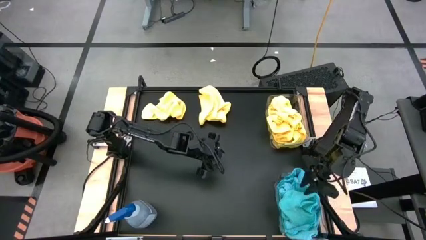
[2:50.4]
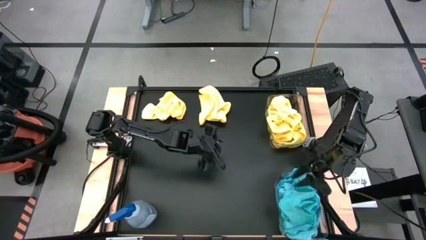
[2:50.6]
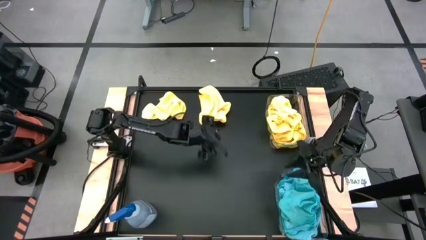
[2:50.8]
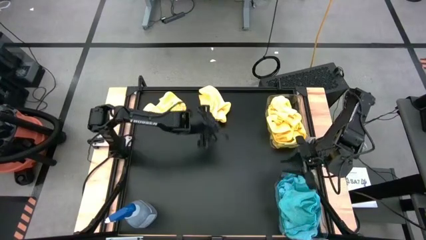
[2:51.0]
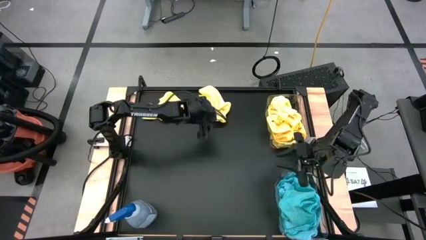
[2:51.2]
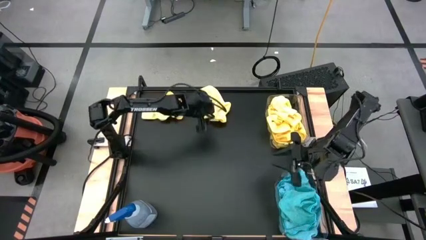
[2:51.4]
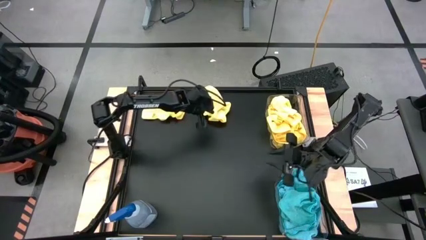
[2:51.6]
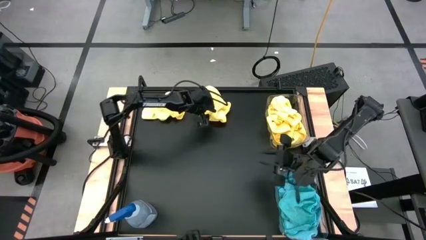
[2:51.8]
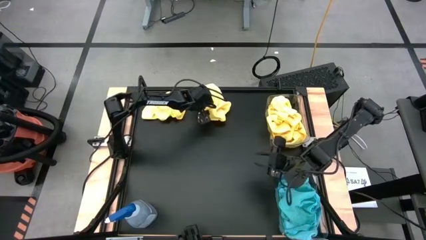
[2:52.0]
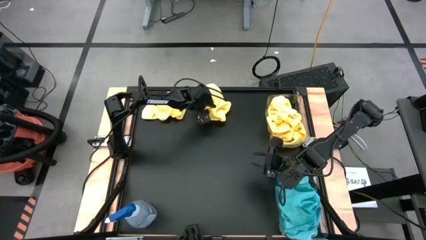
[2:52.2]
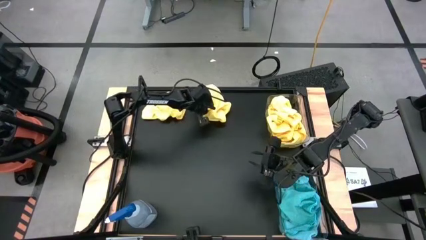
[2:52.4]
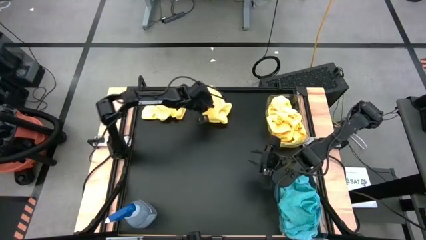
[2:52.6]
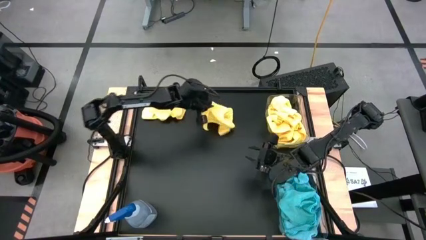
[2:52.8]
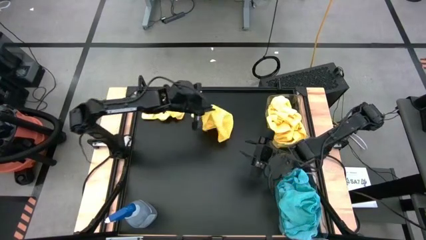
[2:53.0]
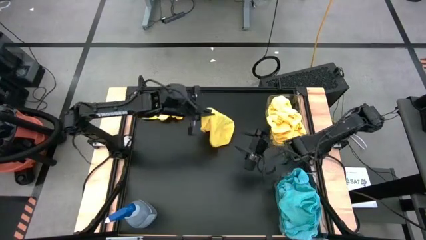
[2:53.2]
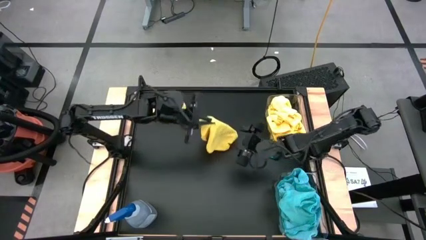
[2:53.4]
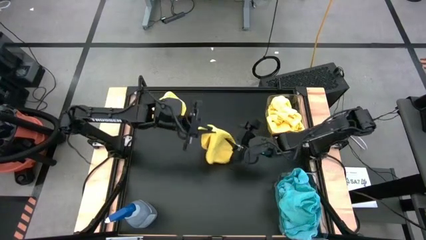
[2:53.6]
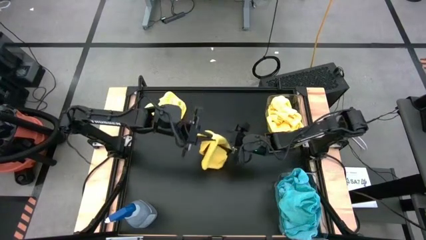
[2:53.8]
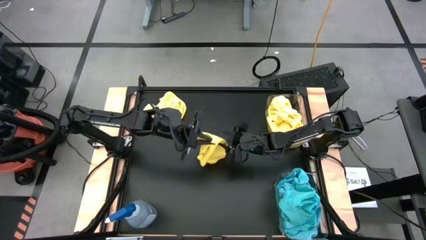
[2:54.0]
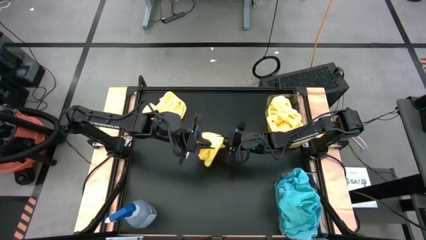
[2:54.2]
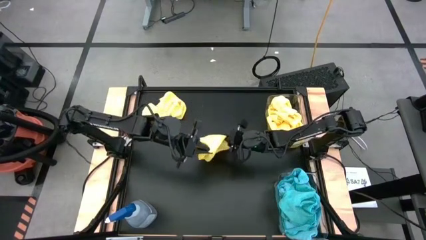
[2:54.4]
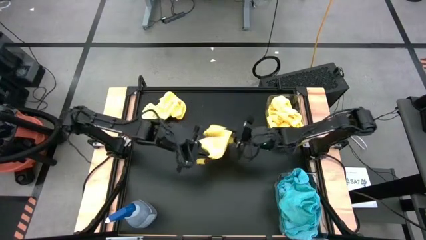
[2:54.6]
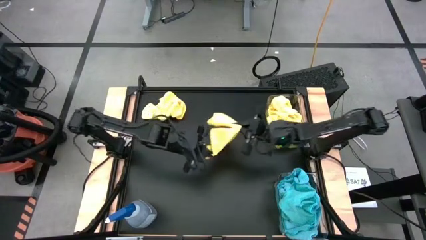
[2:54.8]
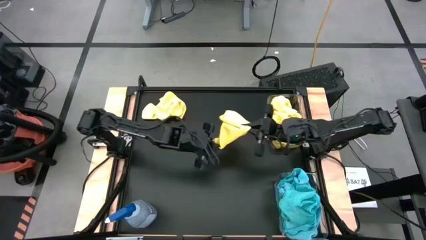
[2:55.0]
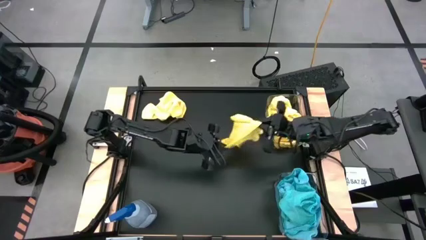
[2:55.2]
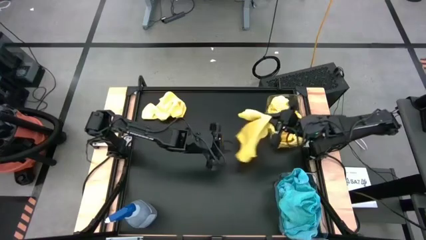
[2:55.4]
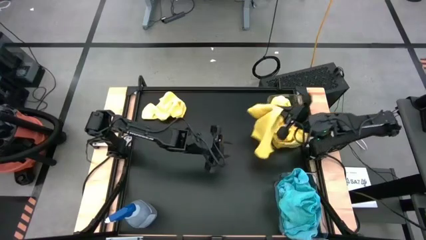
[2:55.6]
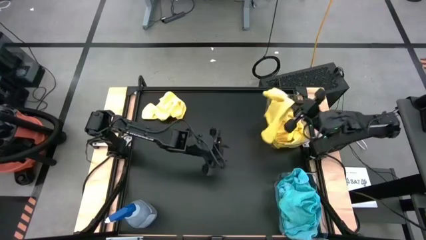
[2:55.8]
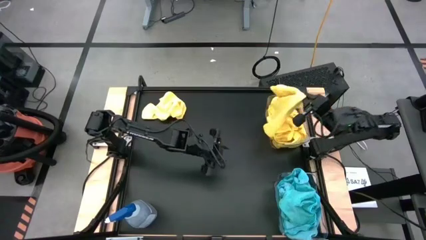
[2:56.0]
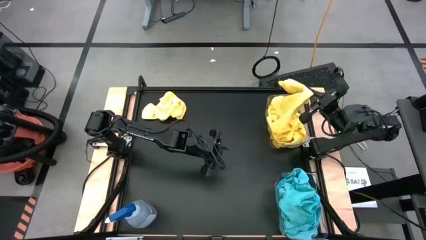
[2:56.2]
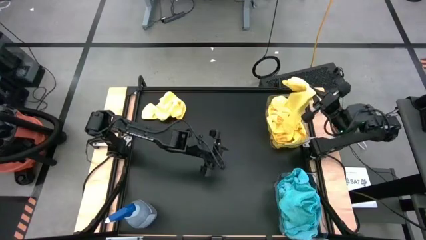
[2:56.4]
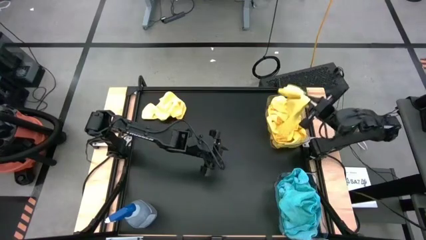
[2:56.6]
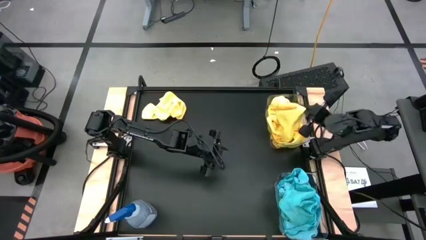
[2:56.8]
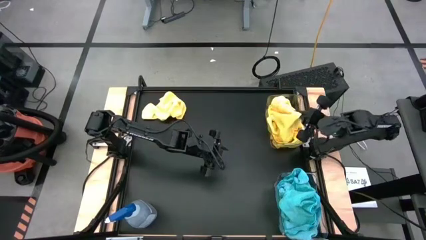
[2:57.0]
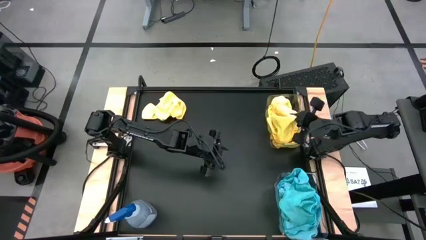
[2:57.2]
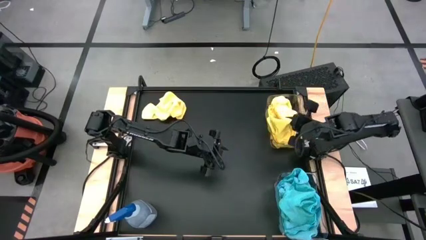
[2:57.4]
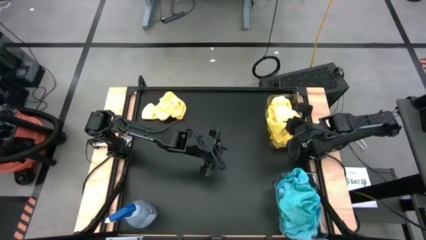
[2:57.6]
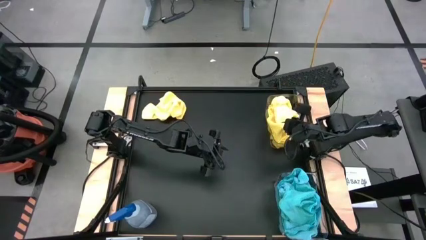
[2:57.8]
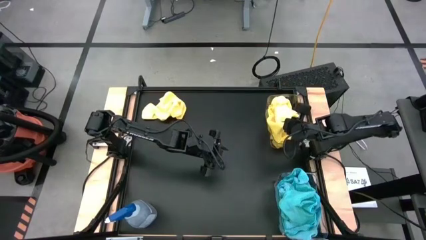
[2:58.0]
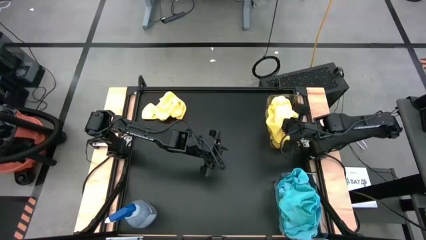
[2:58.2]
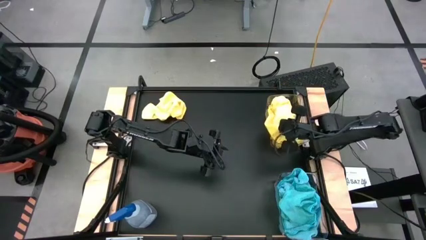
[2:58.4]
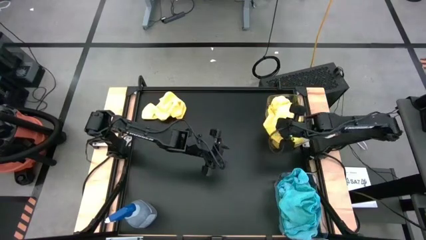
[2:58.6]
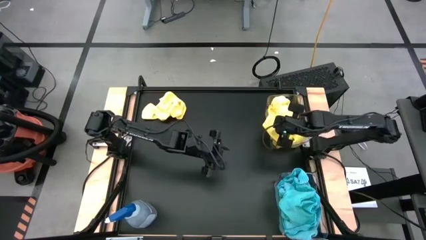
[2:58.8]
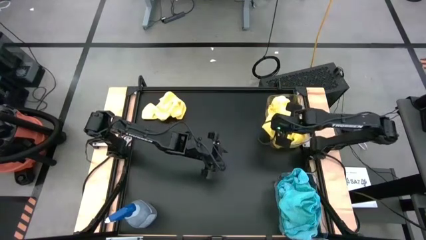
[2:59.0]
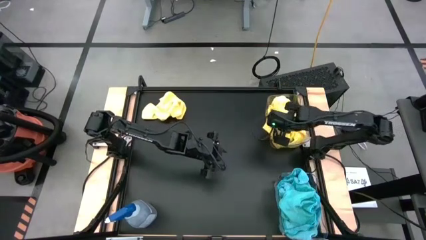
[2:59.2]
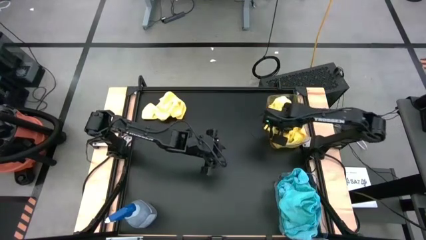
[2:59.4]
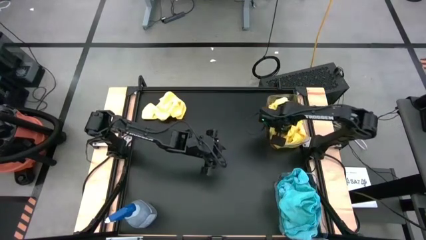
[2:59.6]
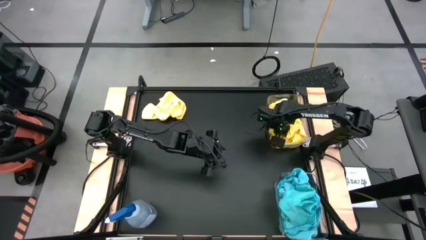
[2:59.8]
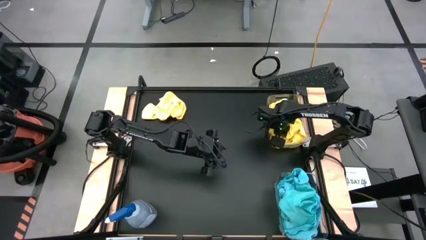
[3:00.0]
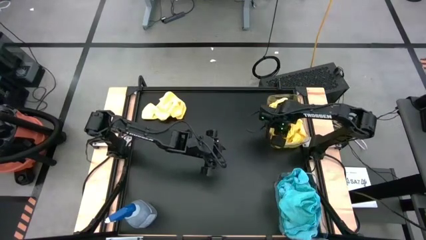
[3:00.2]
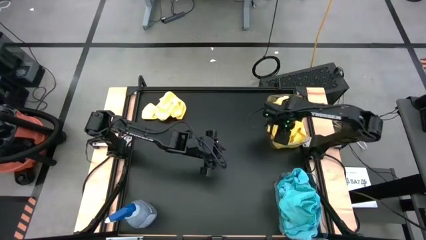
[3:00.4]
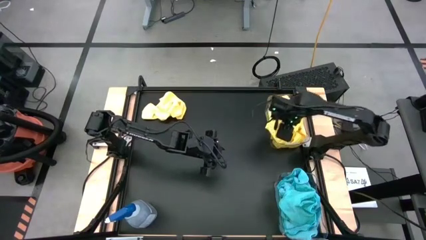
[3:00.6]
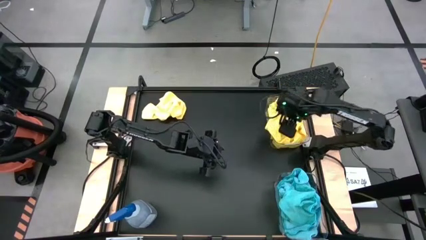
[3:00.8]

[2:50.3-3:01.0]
Task: Sort microfiber towel by color & place in baskets
Put the yellow towel into the top transparent bin

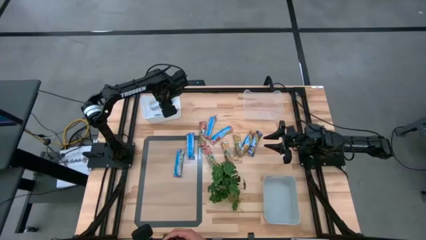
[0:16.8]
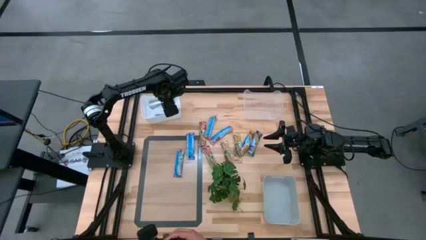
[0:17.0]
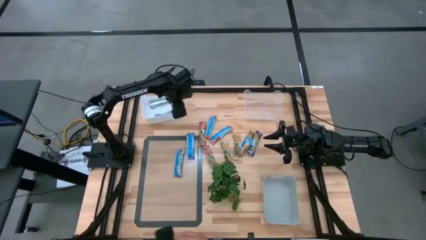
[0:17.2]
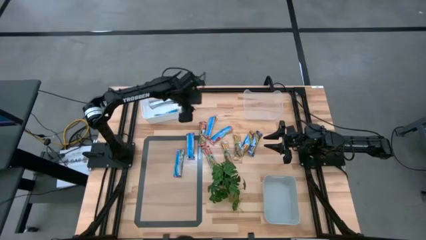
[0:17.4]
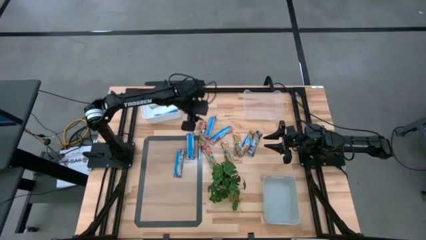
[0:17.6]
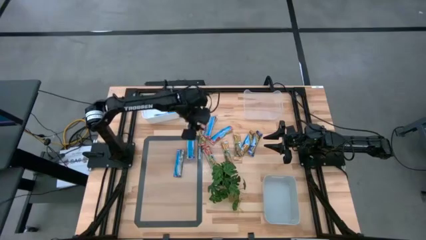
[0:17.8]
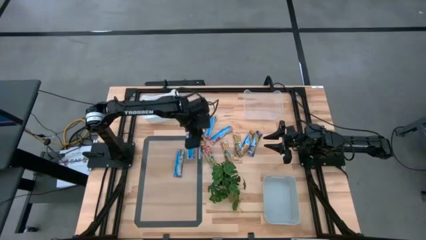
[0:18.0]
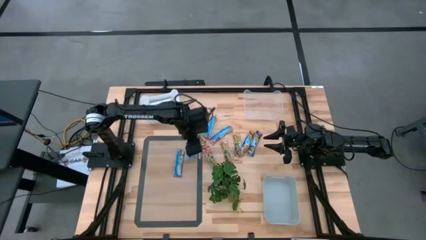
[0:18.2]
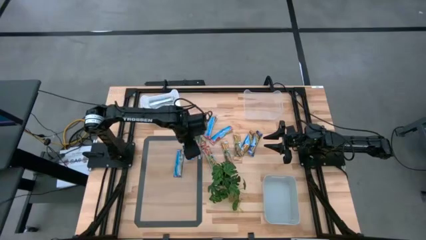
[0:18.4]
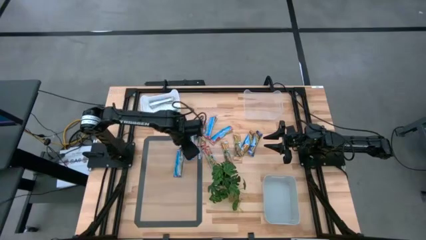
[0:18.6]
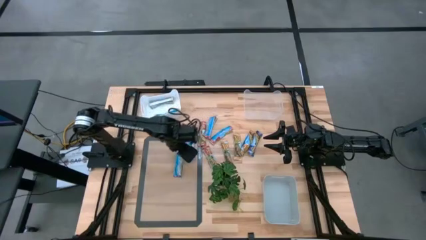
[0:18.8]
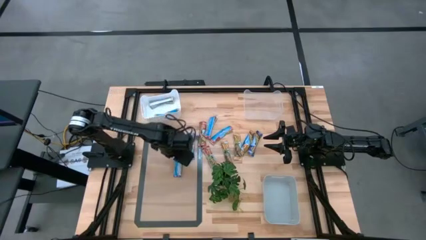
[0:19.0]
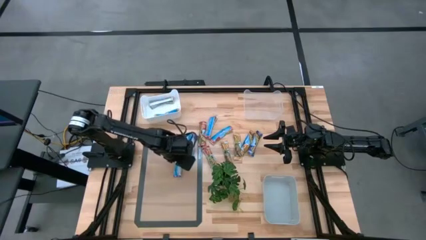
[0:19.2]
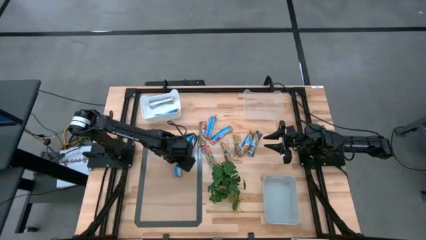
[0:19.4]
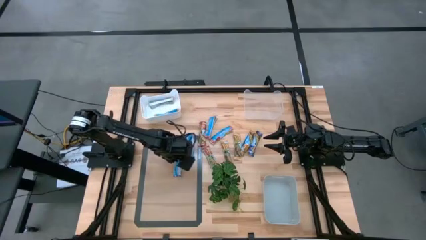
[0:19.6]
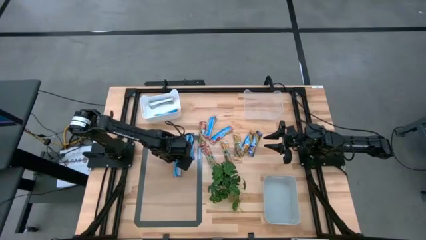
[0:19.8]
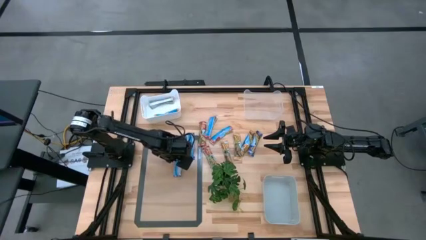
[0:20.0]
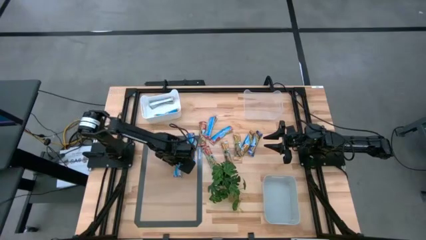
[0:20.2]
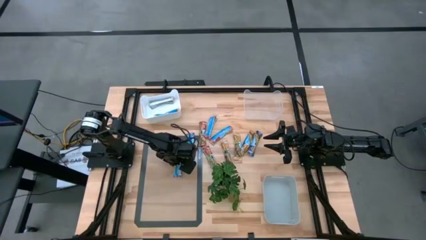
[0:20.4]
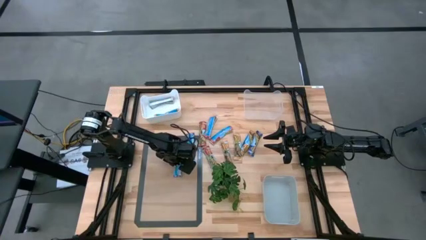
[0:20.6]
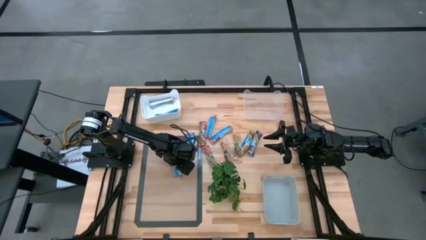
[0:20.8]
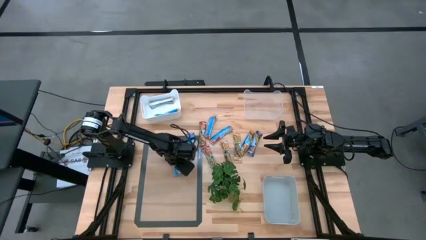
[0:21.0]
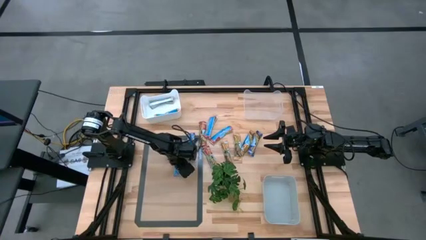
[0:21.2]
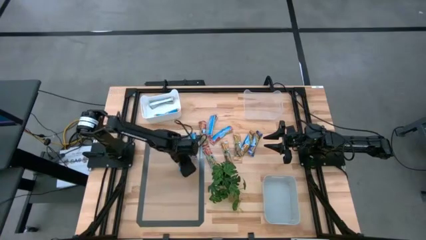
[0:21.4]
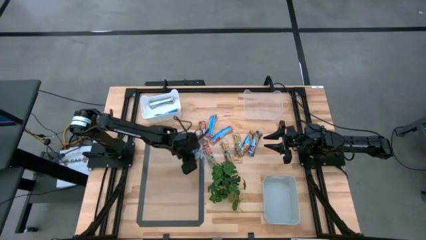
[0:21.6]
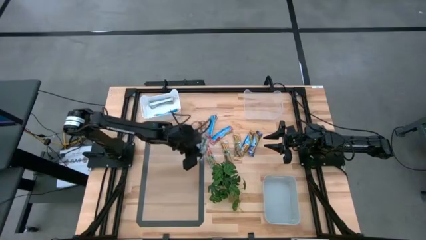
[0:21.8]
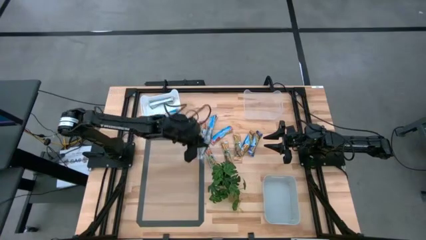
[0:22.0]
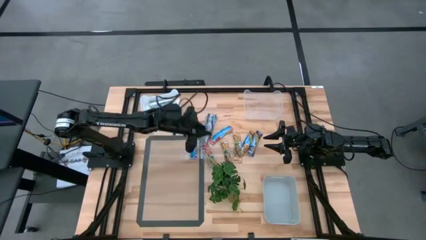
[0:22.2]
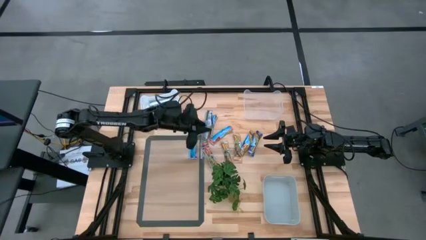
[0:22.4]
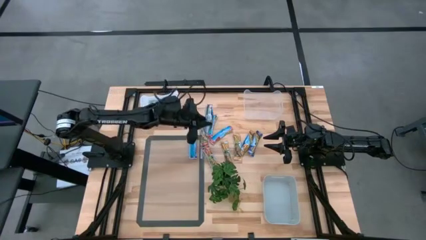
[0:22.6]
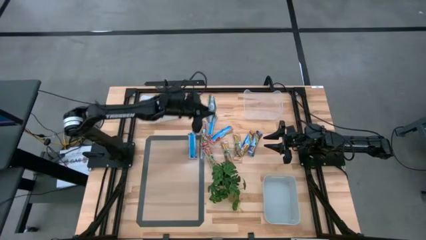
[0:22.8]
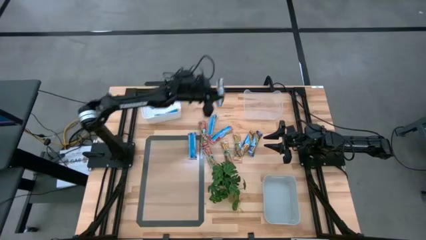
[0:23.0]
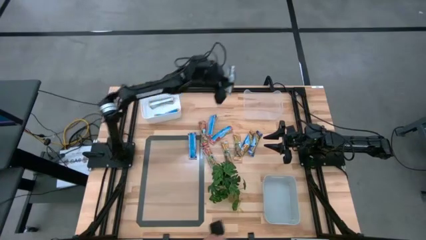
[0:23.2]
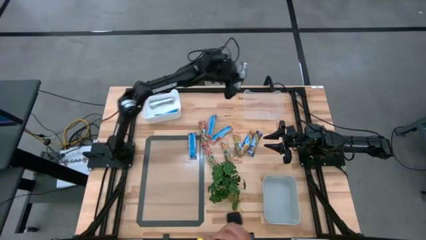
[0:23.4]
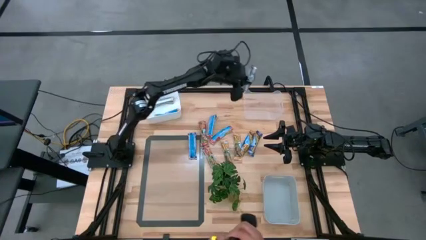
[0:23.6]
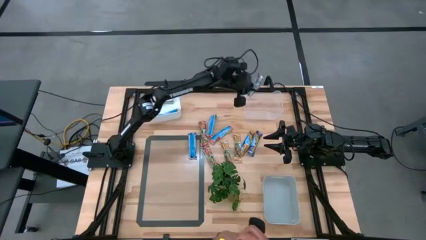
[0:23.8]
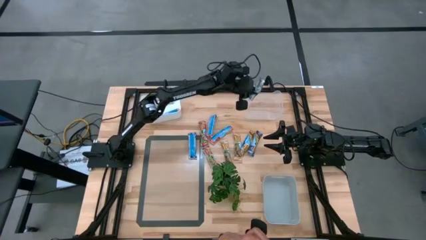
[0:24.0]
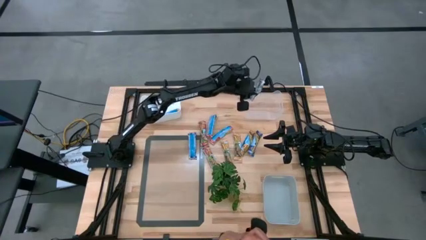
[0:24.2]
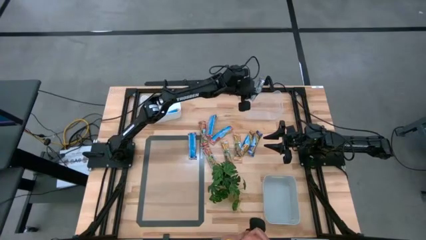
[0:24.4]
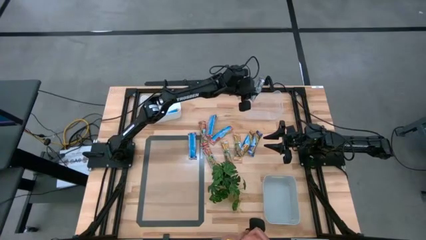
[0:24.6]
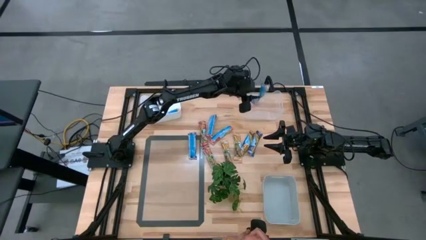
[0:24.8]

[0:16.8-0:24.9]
Task: Pick and place Granola Bars by type
Put the blue granola bar into the transparent bin
